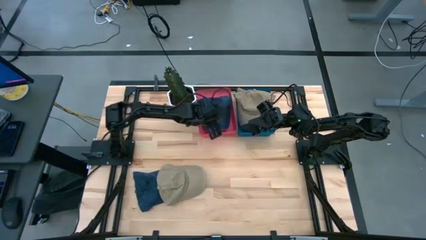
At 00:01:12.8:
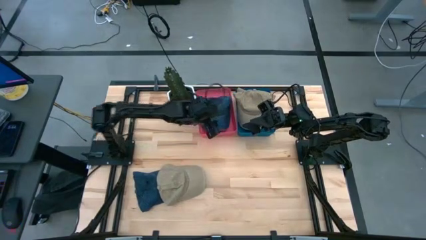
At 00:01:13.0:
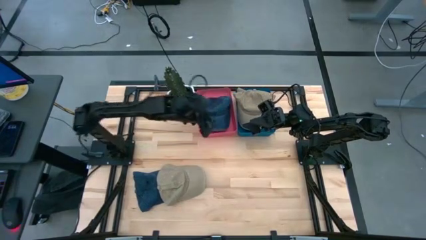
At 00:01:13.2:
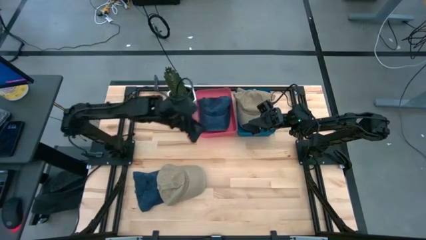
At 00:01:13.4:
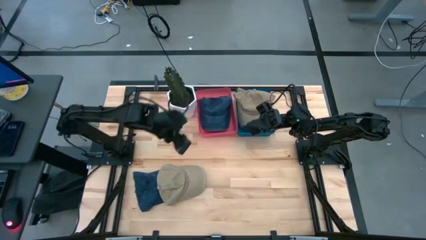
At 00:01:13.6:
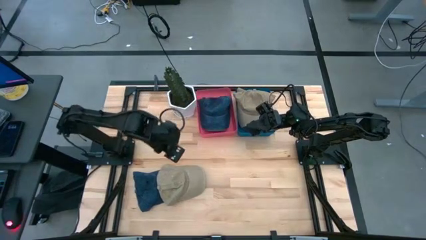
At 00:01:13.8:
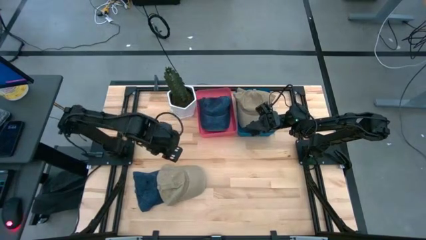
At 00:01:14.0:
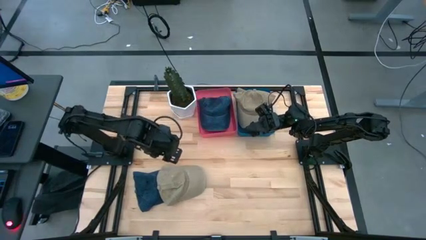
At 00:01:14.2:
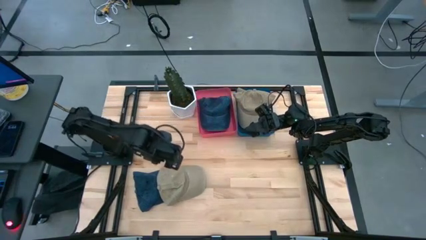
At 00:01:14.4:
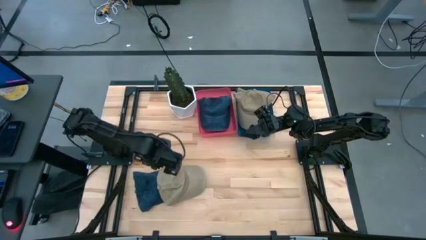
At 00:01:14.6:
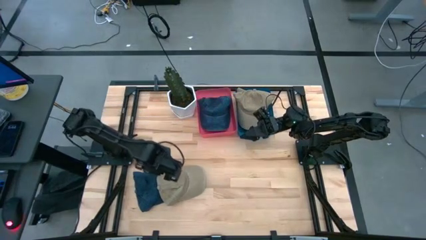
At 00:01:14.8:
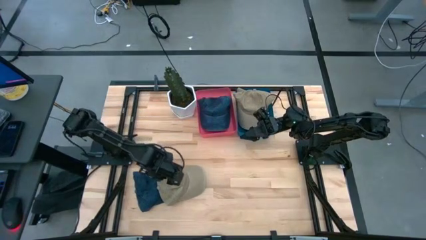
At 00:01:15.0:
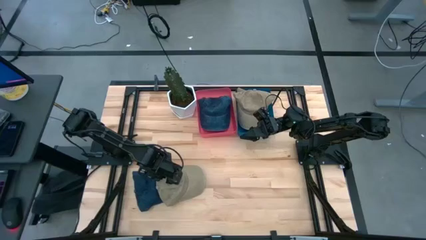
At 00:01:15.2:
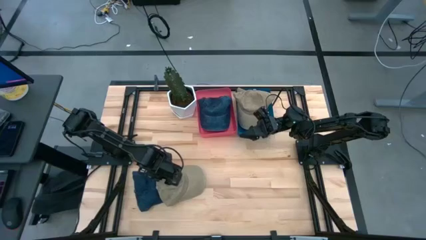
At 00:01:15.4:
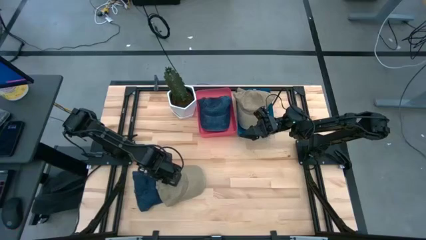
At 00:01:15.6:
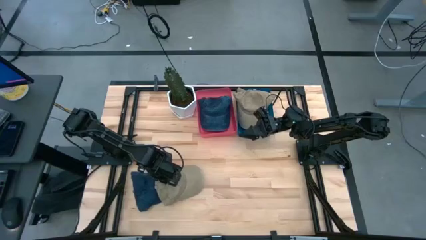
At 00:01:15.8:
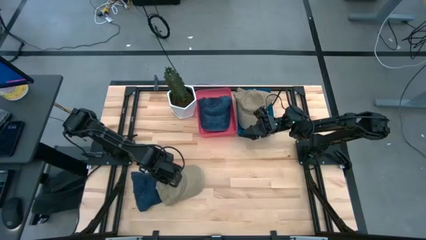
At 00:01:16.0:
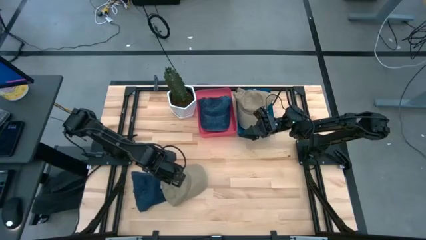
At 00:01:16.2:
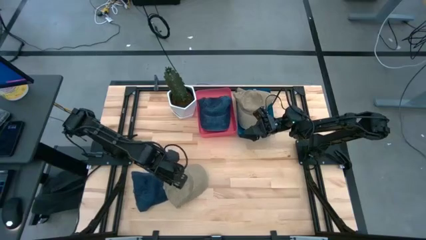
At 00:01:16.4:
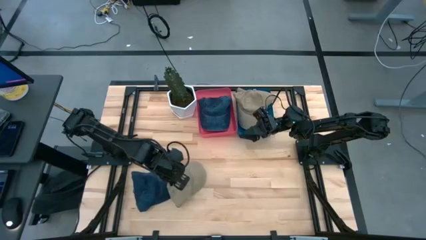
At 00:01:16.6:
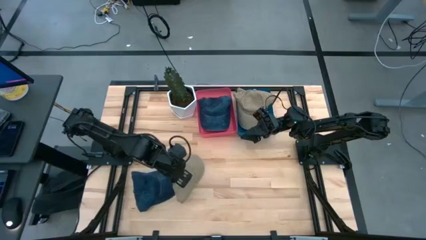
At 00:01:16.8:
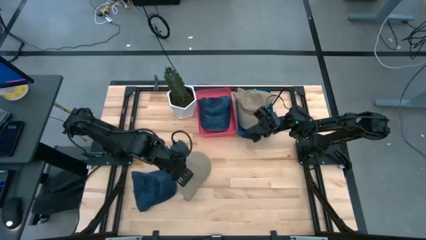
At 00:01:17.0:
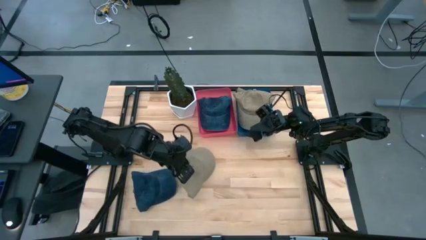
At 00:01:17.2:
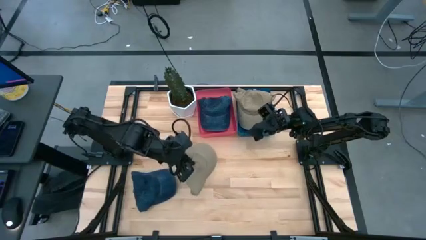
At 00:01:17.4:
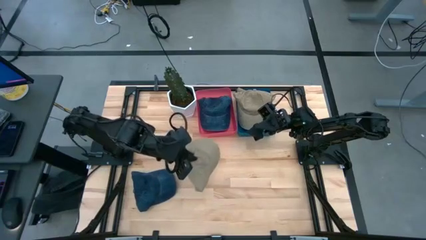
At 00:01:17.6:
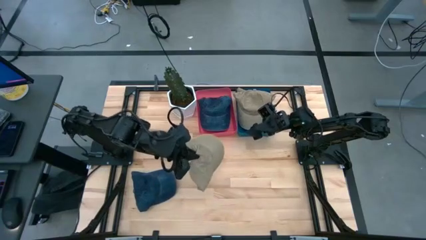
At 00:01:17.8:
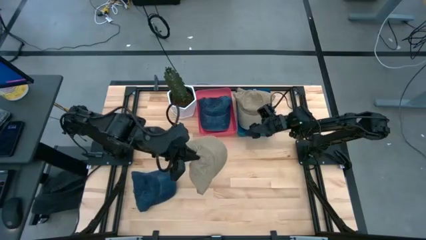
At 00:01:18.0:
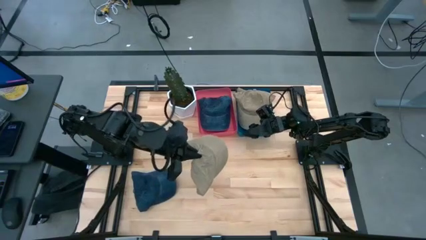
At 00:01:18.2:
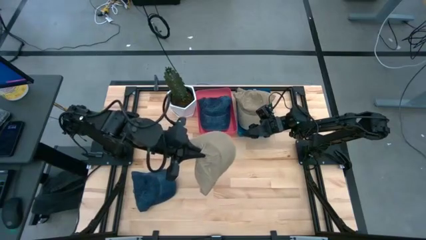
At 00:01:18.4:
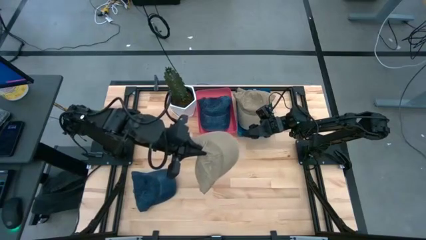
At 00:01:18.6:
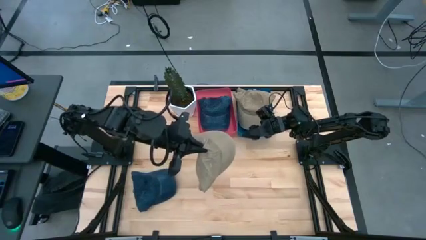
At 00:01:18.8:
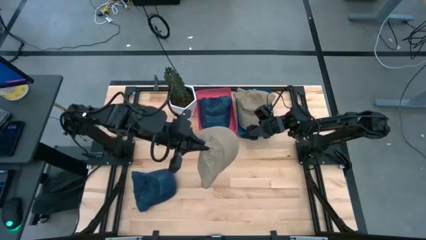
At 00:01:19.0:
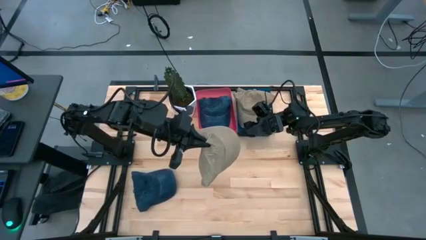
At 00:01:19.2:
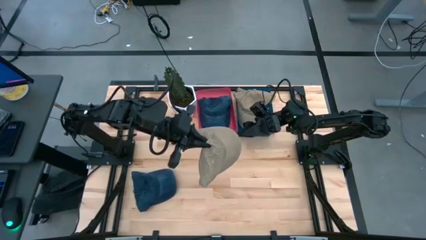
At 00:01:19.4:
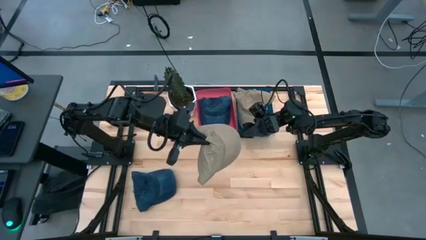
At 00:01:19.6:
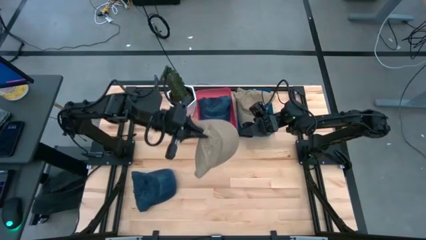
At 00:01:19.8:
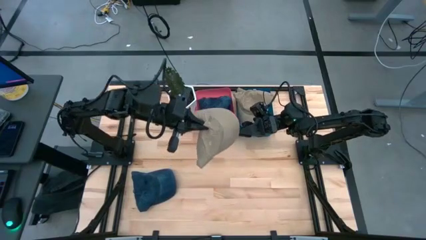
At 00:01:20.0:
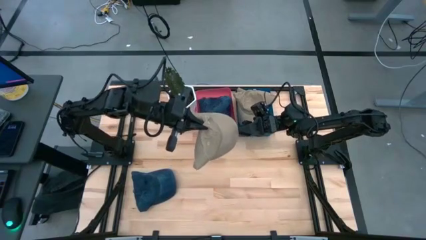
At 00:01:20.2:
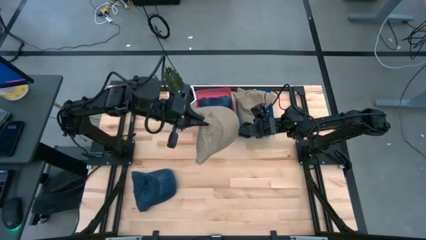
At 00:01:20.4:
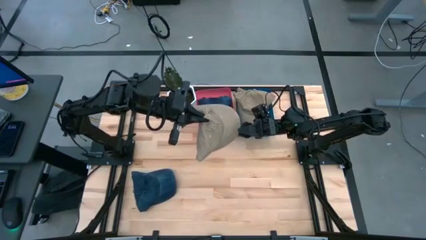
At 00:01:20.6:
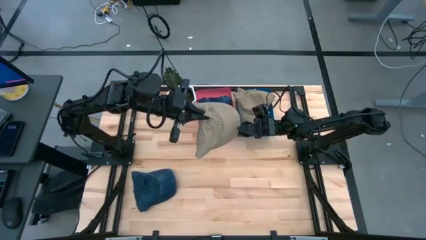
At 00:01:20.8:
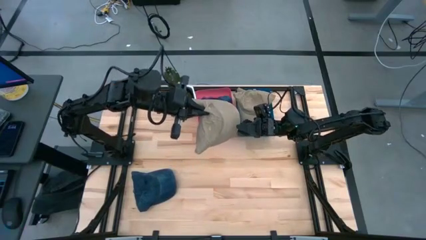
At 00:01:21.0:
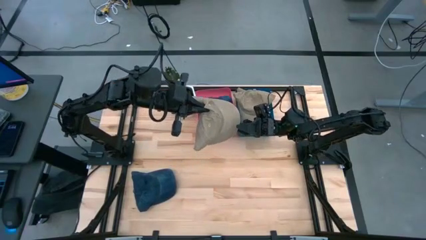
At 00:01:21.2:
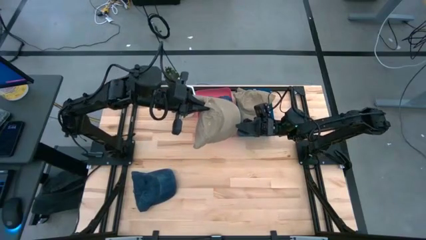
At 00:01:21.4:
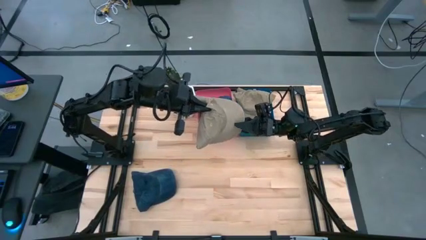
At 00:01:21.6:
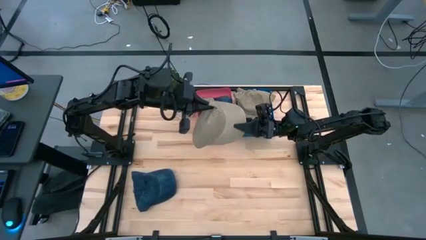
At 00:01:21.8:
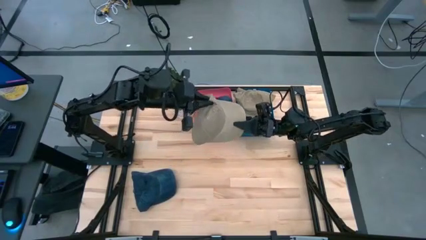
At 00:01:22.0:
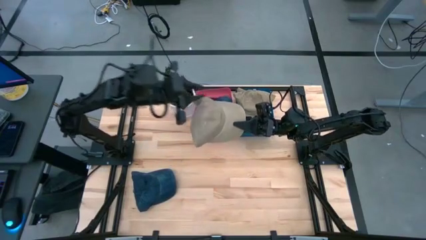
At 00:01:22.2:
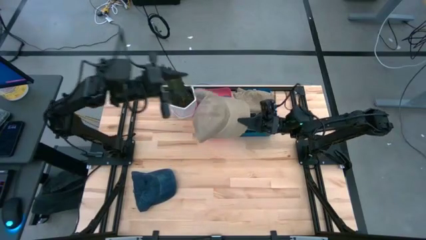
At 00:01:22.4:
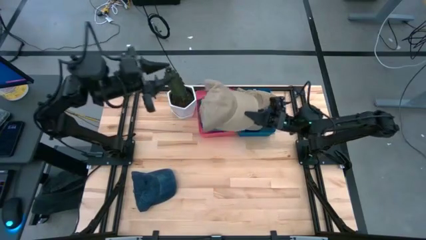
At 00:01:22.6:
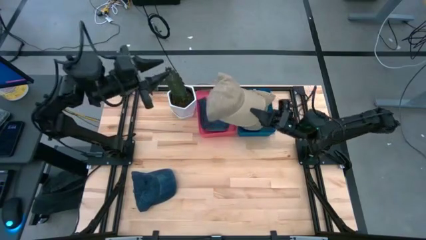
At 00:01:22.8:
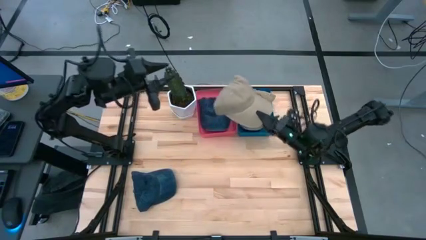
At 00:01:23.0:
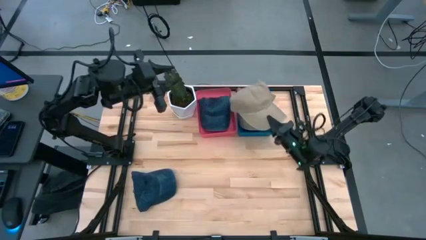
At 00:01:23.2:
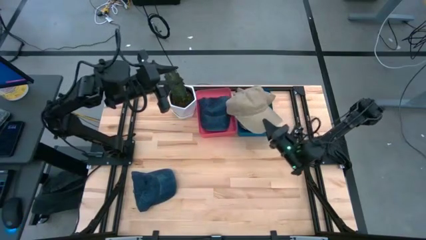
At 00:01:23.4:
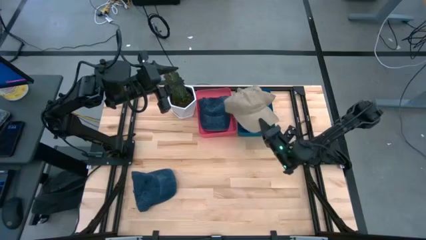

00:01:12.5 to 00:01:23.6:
Task: Pick & Place hat
Put the brown cap into the blue bin

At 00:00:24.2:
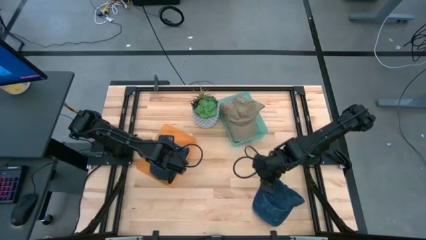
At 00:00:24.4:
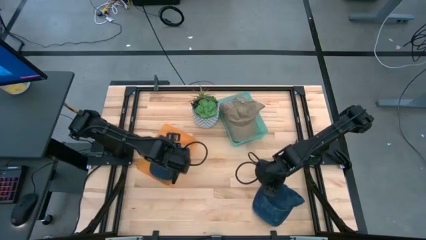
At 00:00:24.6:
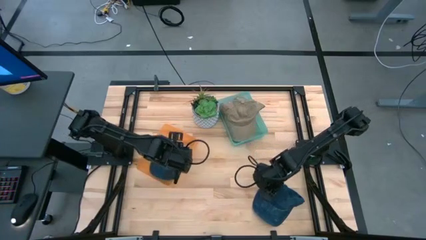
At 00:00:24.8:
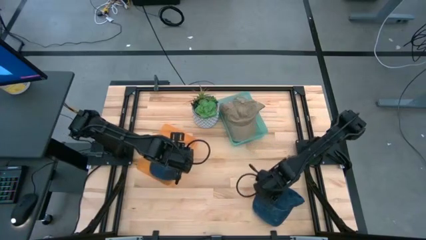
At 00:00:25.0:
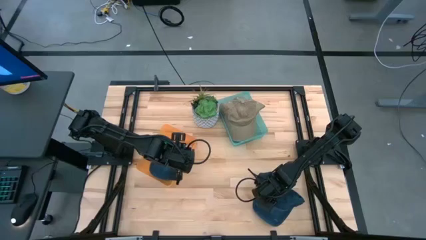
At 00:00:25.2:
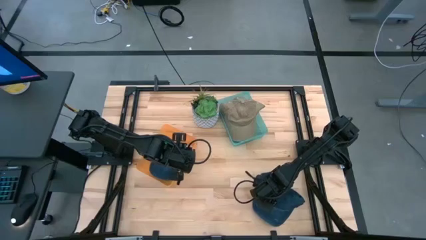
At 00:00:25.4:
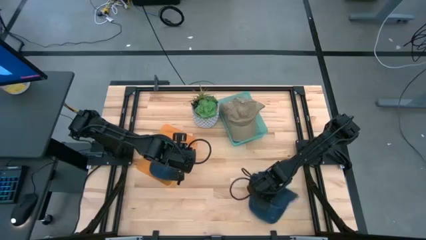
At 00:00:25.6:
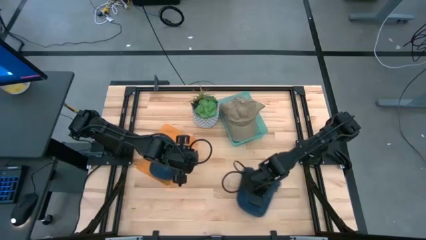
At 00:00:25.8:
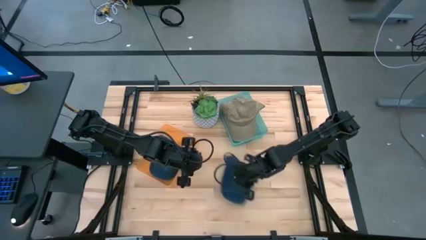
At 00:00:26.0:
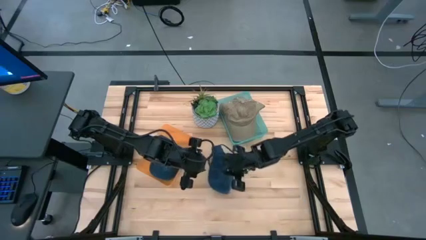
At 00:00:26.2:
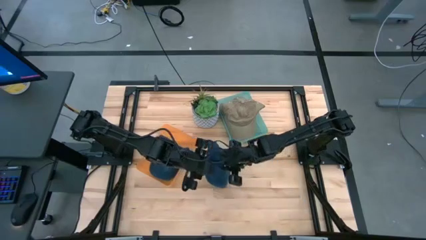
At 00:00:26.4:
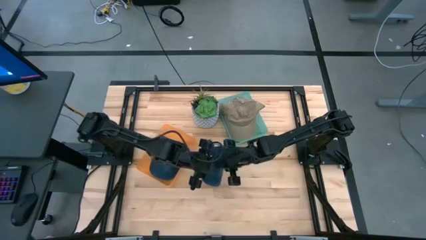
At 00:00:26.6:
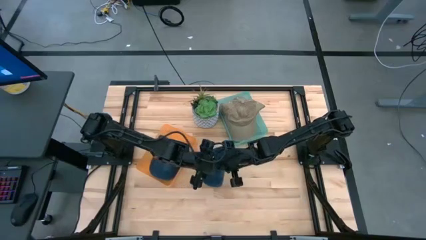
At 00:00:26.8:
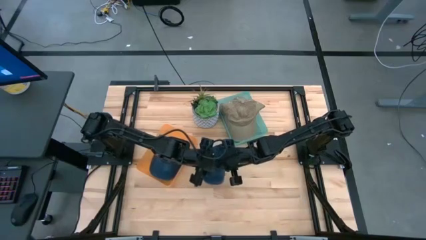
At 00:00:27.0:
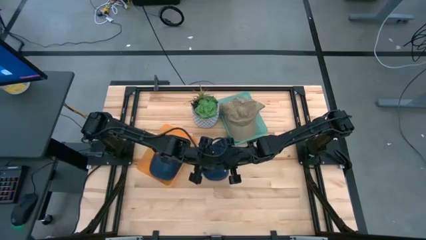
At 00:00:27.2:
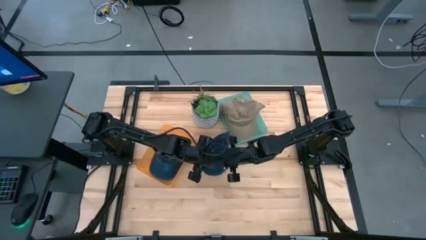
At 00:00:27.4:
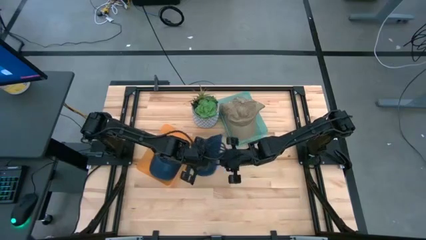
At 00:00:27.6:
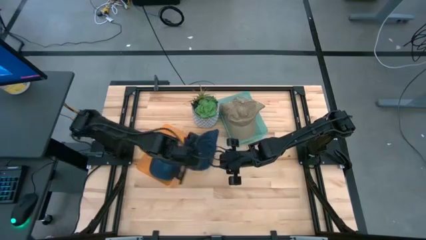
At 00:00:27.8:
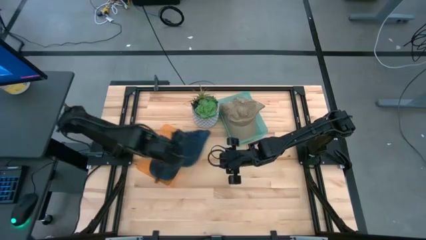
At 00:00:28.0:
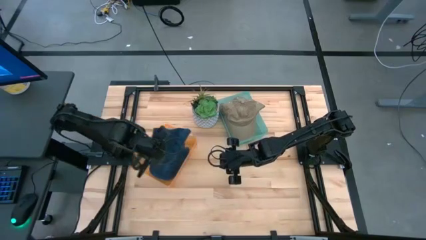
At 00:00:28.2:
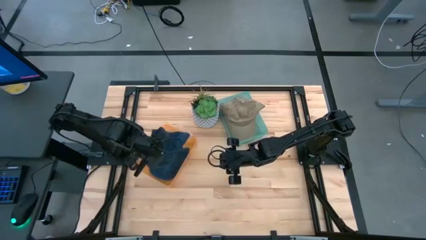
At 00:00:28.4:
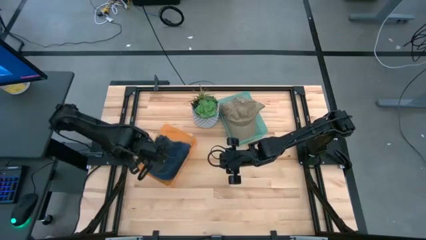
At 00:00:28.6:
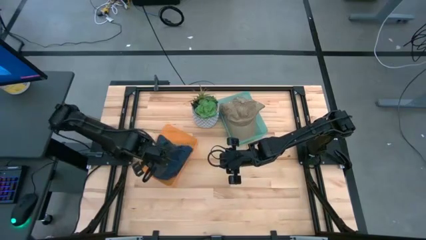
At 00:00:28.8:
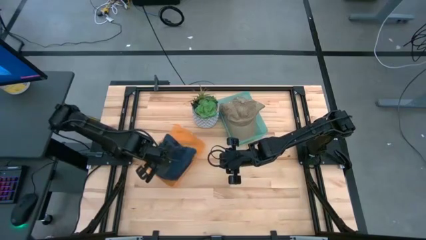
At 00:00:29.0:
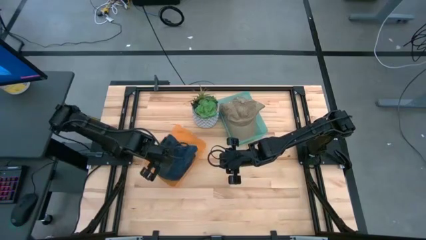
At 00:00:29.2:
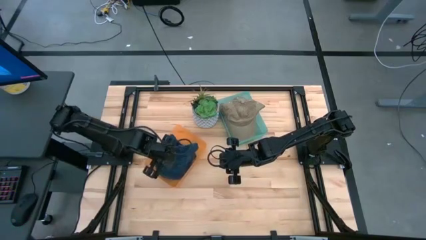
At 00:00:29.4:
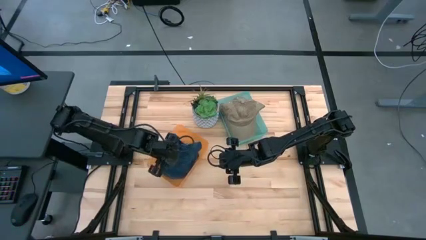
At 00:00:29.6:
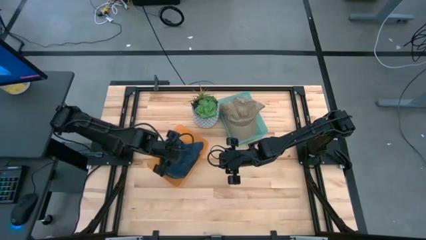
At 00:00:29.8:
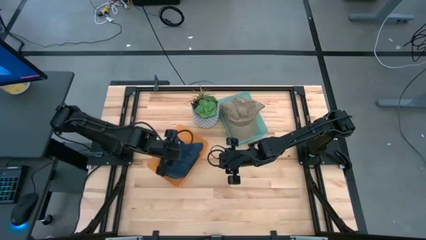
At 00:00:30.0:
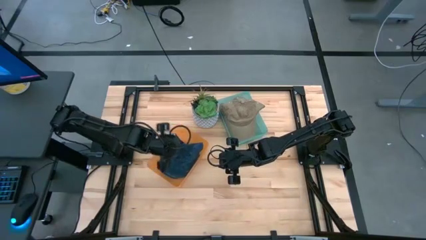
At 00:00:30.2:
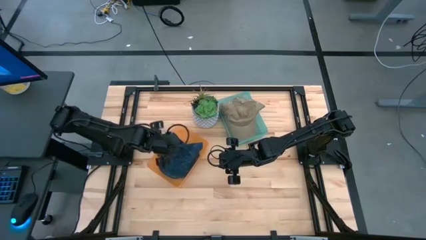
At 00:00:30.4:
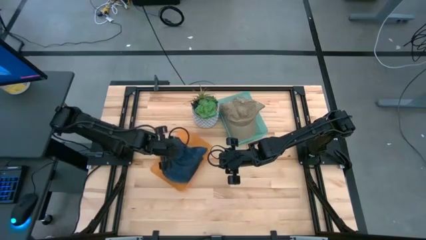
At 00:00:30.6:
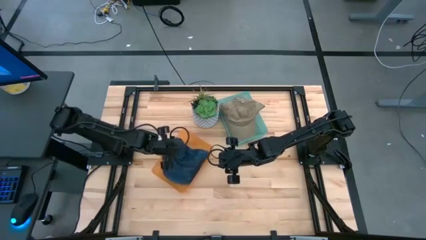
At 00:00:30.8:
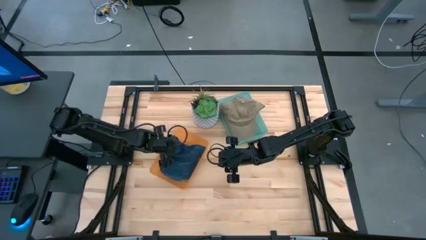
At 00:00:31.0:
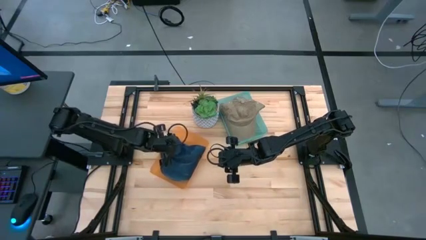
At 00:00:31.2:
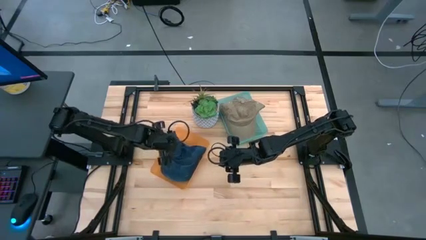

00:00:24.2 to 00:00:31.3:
Task: Pick & Place hat
Put the blue cap into the orange bin
